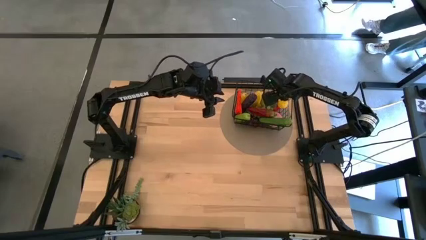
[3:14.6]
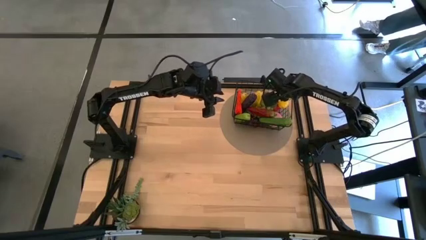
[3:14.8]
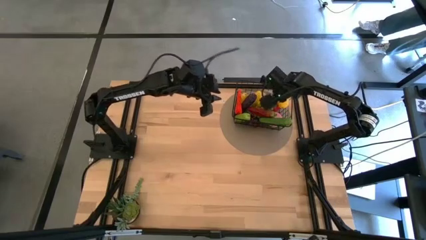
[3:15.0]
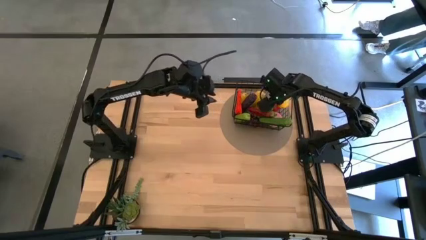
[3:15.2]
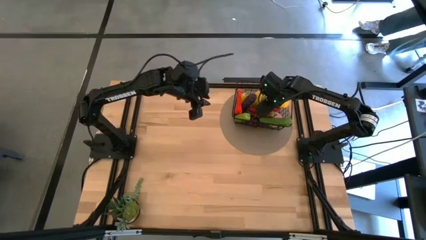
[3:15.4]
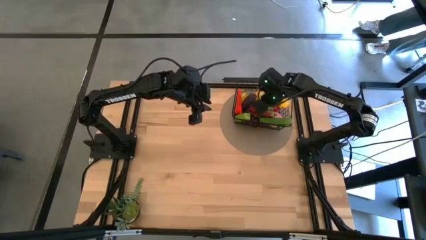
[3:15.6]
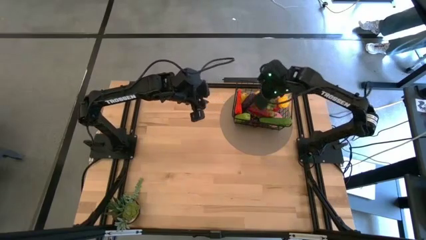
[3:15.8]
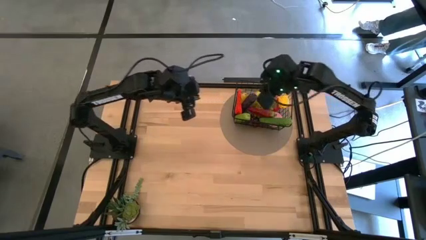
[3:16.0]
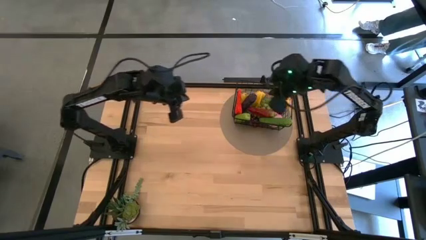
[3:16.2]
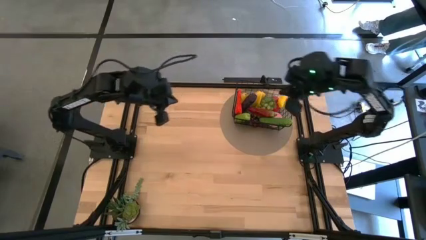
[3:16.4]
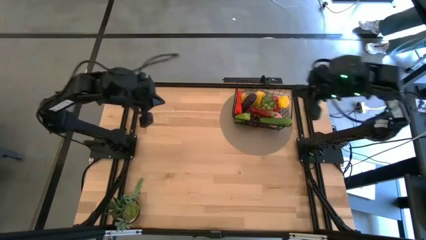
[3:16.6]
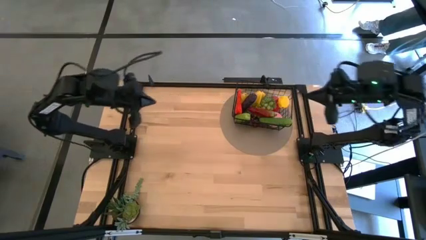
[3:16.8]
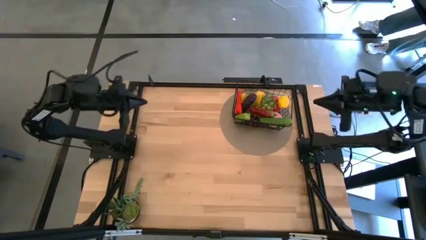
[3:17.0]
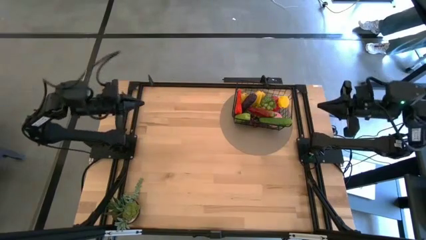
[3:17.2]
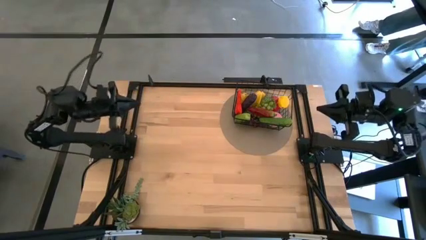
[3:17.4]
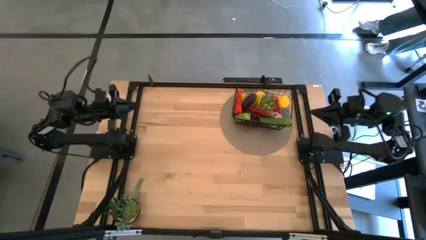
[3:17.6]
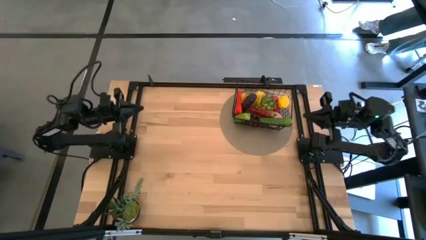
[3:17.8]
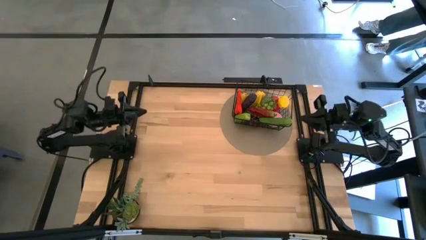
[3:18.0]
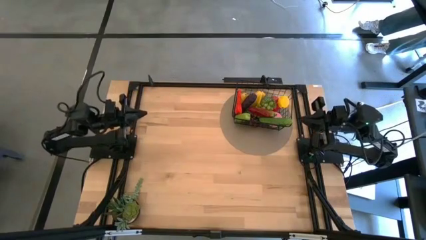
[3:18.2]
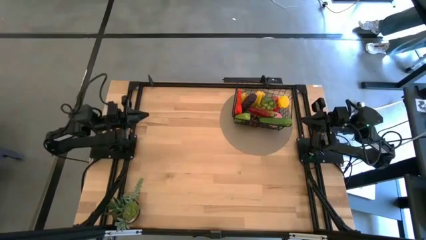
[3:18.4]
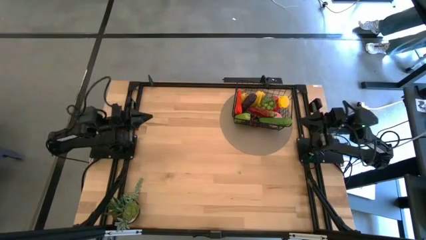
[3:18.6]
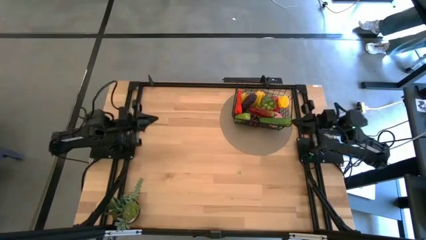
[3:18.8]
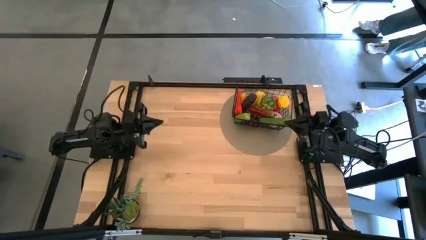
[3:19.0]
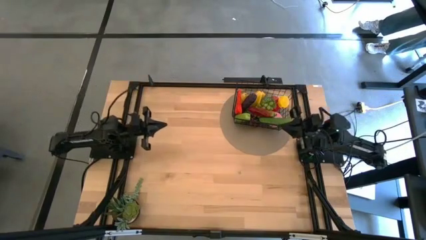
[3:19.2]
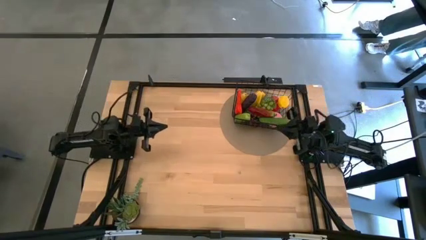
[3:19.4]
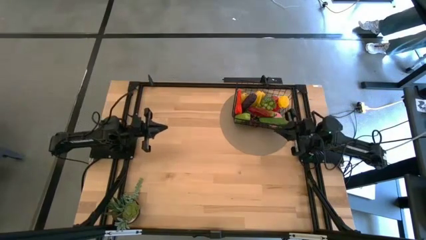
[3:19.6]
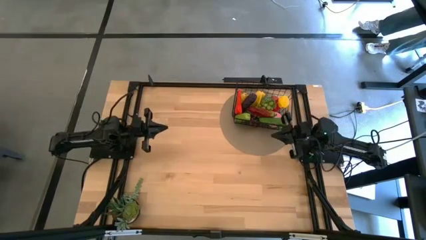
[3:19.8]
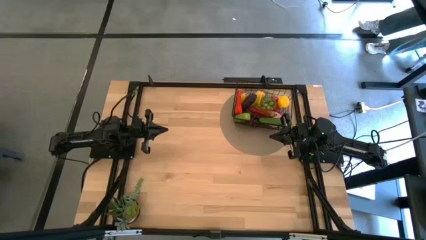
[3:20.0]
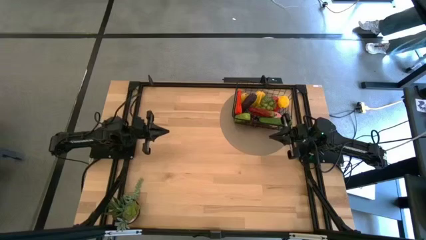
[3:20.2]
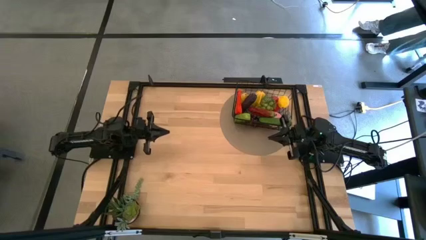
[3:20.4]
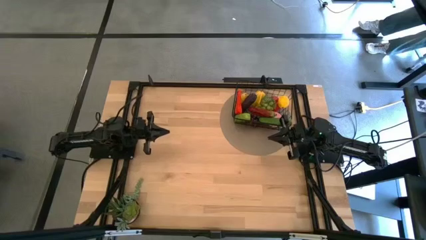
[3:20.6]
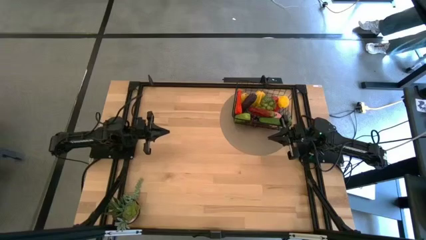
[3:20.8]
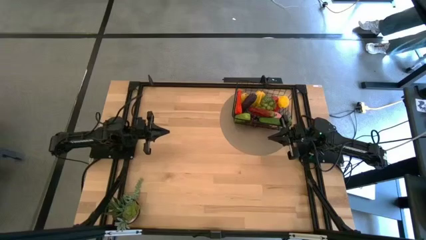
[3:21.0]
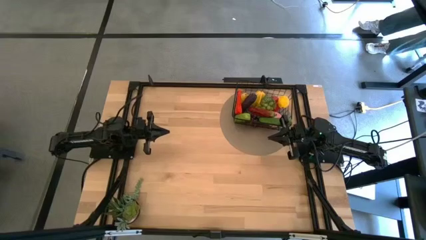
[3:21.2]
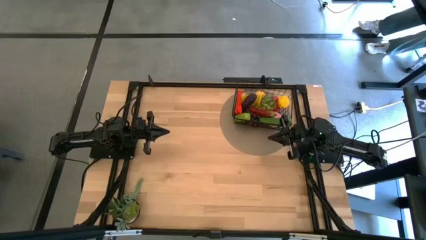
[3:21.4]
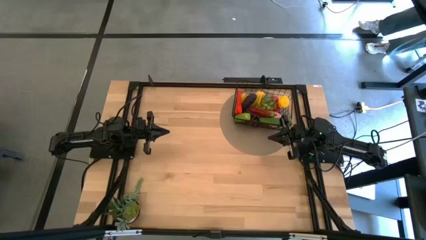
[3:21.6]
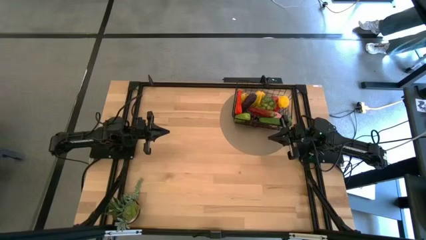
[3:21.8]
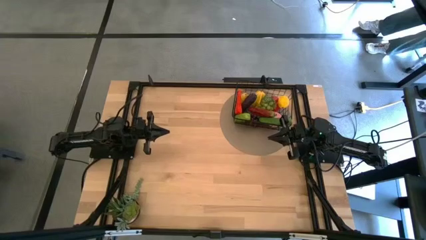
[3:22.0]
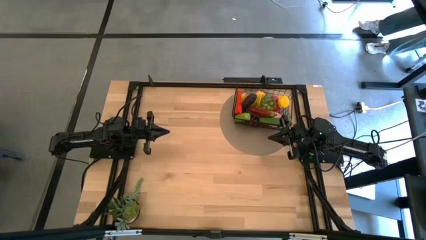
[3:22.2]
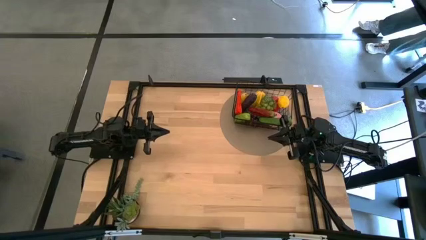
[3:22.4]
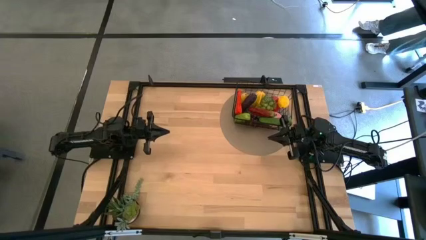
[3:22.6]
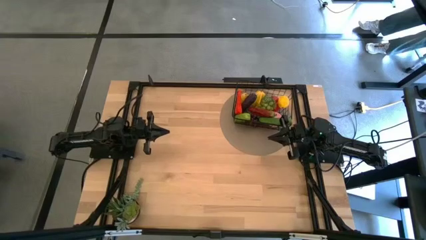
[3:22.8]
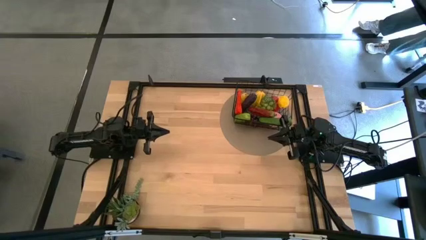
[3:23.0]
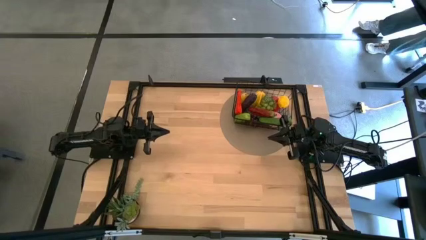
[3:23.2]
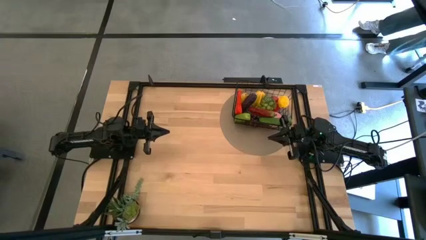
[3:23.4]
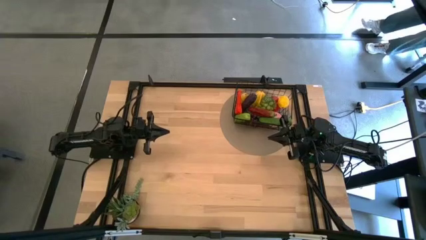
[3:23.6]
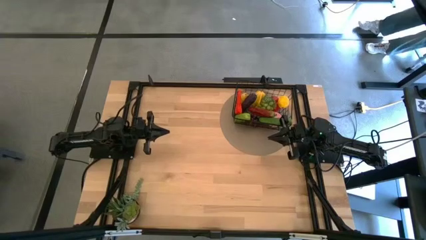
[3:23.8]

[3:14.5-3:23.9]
Task: Build produce basket
Return to Home Position

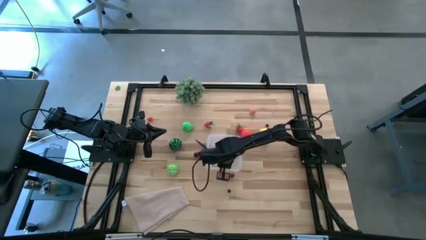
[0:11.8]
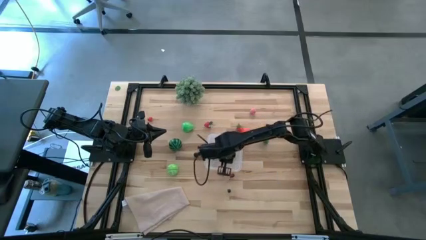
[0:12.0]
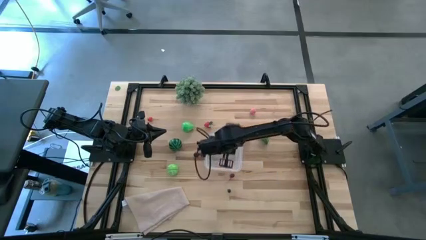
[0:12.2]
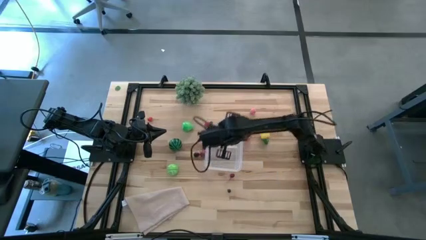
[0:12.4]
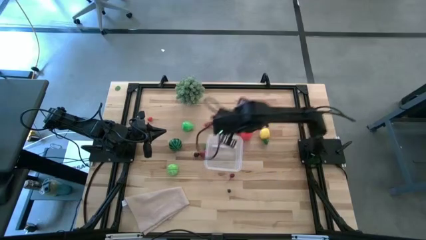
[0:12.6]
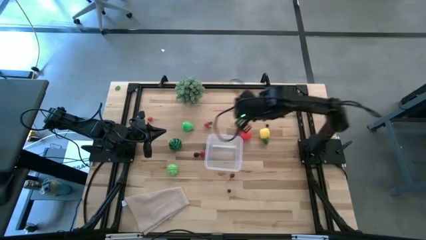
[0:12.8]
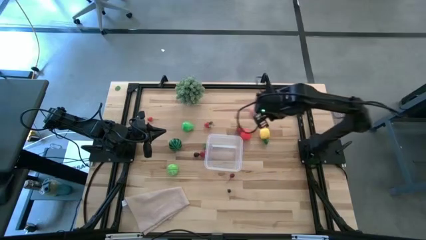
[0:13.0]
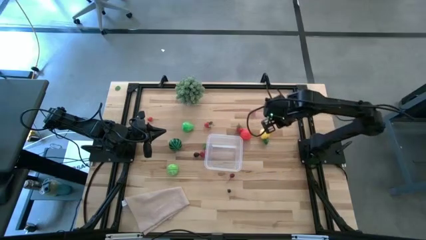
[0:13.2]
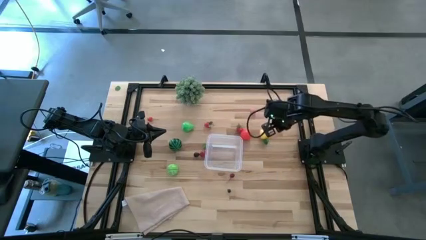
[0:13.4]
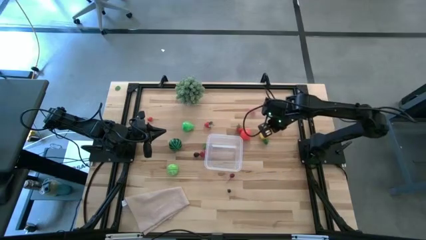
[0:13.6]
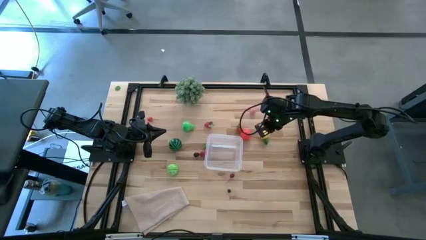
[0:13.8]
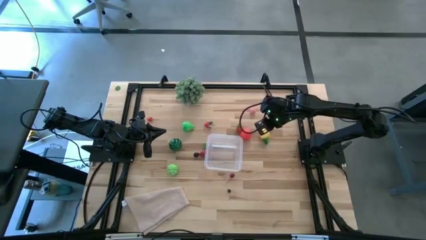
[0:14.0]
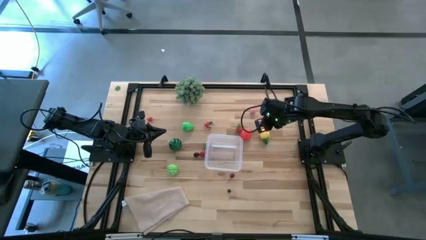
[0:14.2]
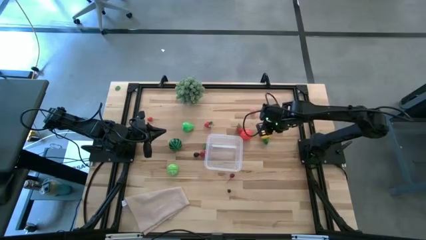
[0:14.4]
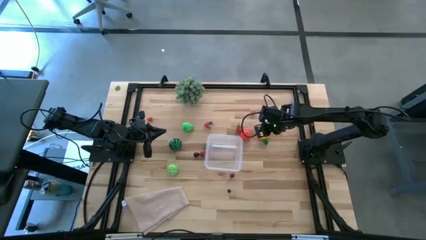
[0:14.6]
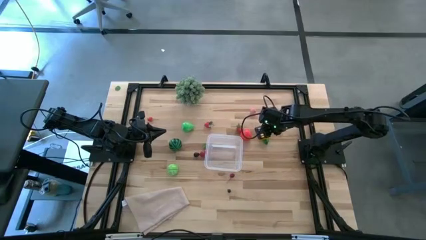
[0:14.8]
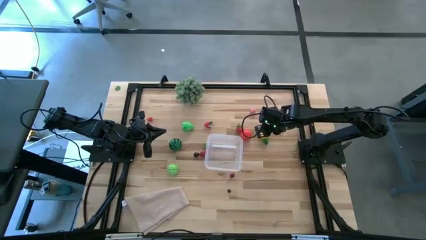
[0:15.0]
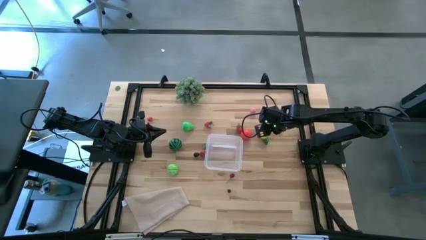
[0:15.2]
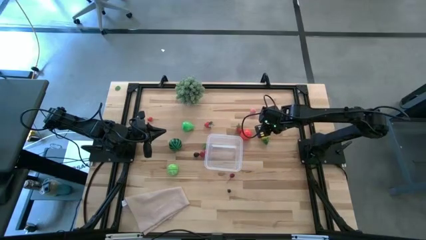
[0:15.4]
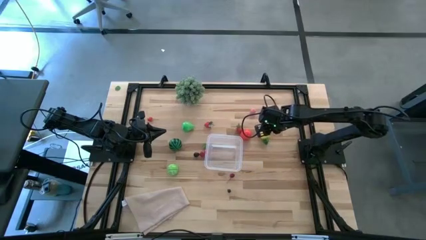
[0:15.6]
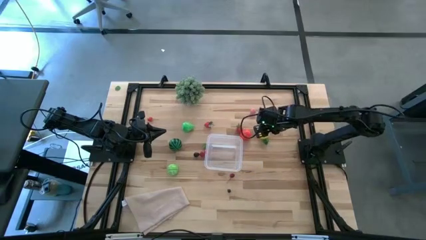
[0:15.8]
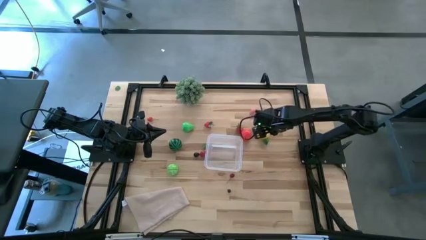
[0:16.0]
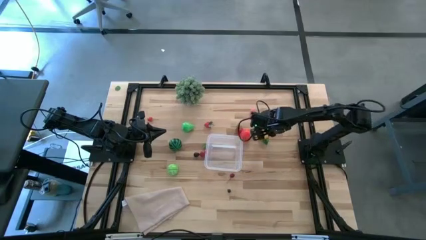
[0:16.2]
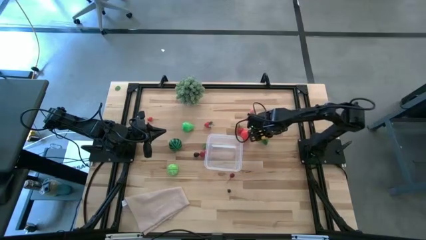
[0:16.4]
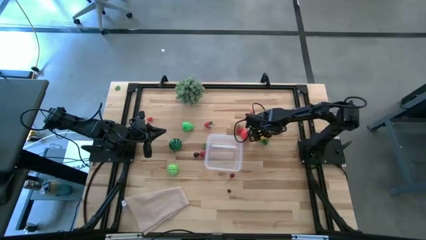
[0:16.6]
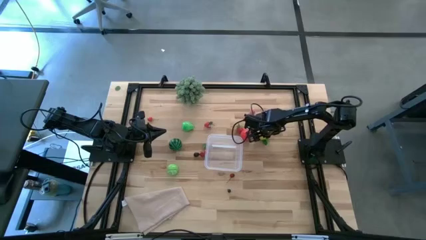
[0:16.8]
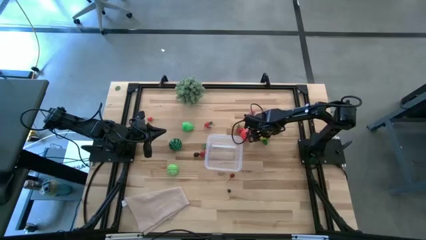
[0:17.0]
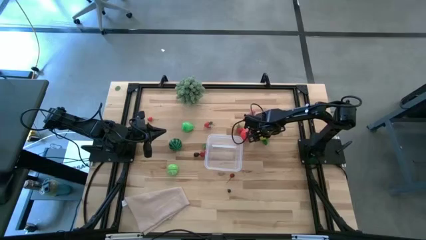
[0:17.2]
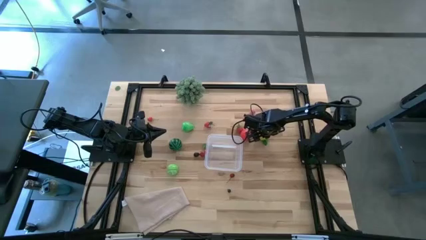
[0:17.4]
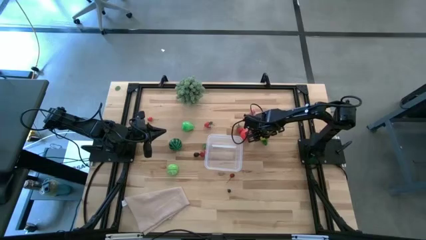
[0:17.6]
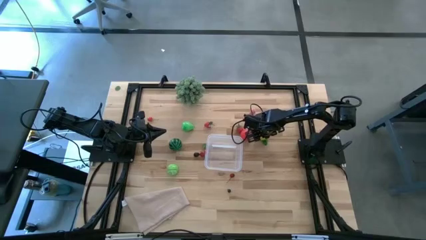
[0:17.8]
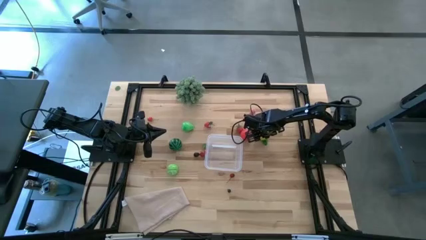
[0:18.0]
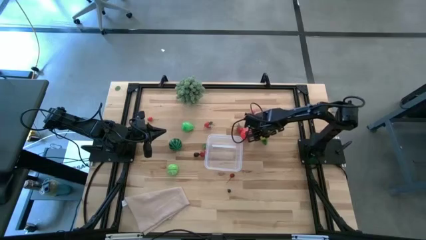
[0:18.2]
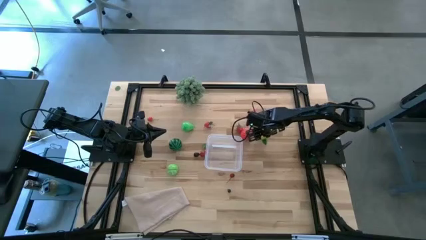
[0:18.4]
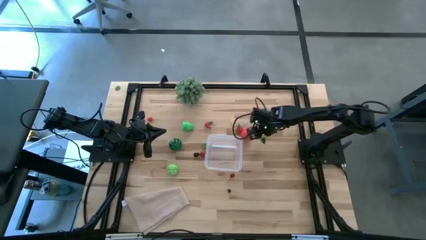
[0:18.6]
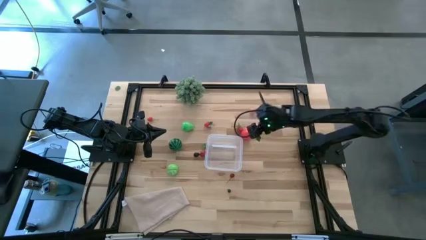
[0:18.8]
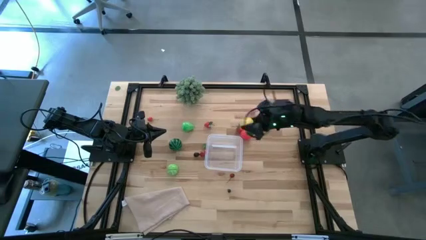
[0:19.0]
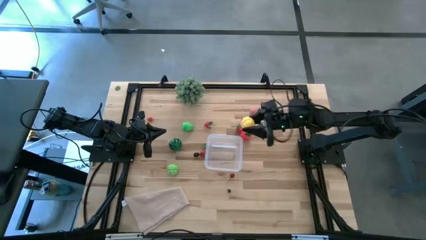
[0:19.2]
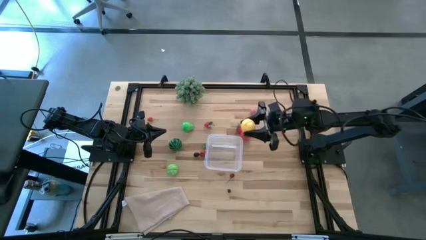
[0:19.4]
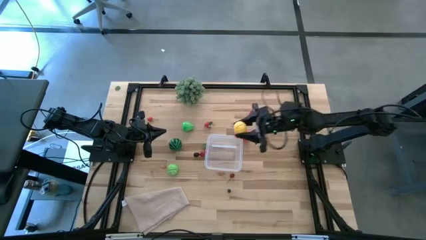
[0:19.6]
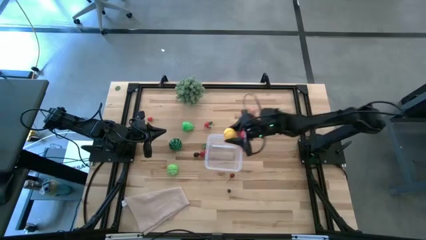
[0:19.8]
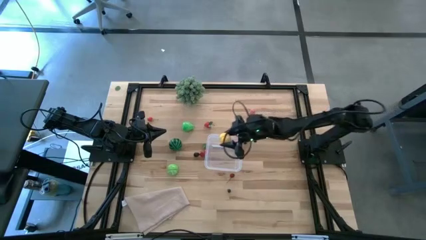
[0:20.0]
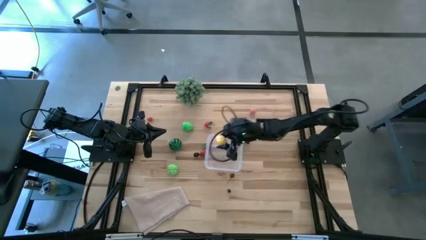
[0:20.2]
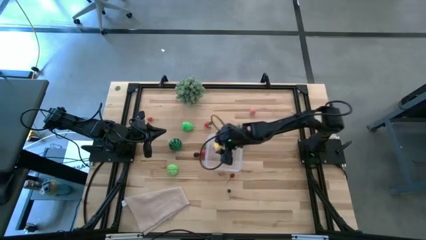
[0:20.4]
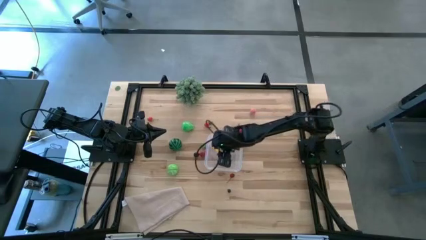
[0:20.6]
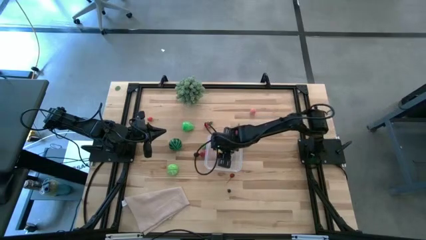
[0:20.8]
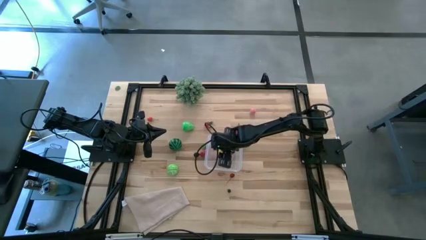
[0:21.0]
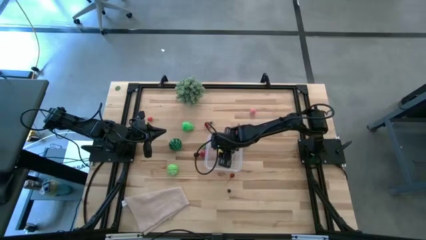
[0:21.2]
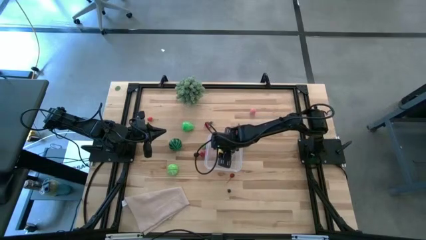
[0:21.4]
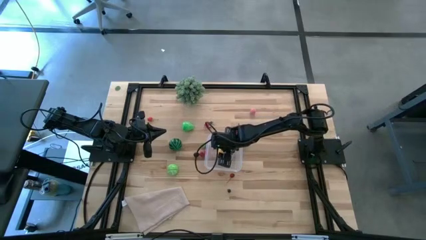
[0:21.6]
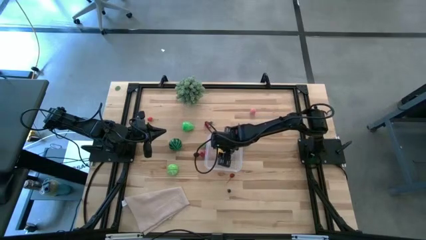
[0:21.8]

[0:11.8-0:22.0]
Task: Pick and placing Produce into tupperware
Put the yellow pineapple into the transparent bin
